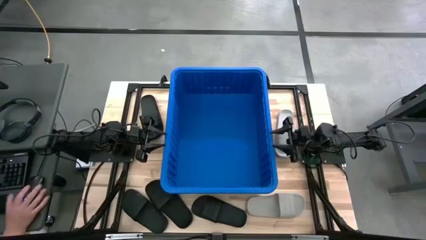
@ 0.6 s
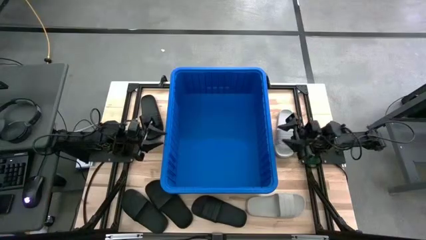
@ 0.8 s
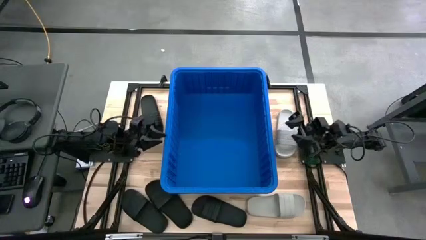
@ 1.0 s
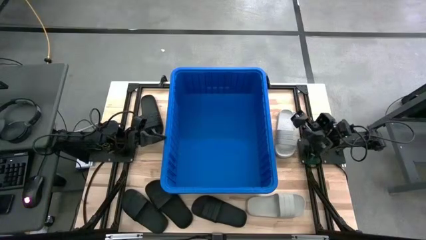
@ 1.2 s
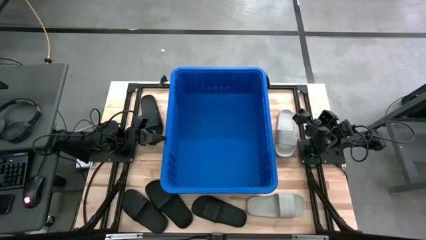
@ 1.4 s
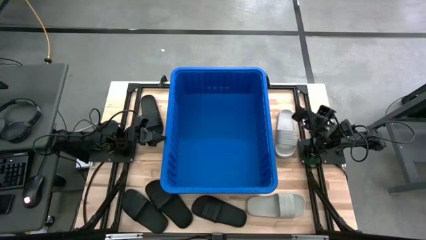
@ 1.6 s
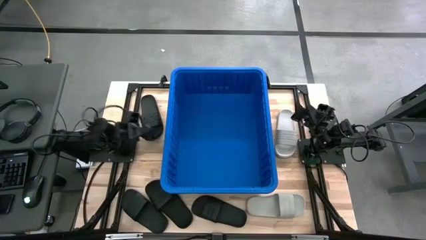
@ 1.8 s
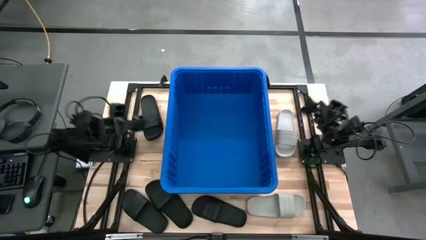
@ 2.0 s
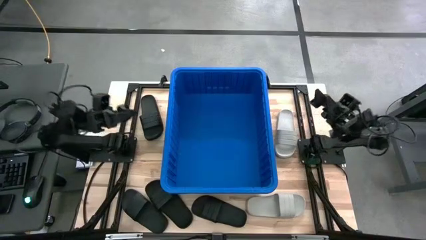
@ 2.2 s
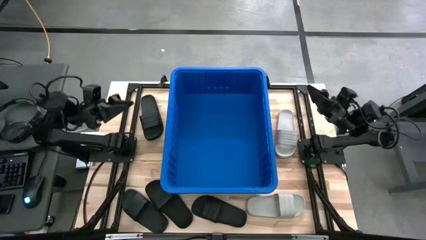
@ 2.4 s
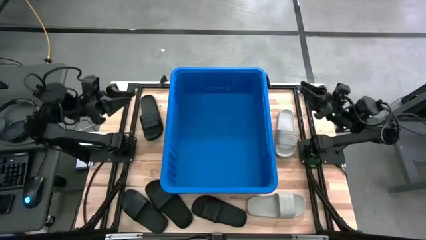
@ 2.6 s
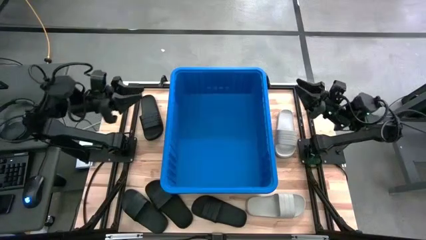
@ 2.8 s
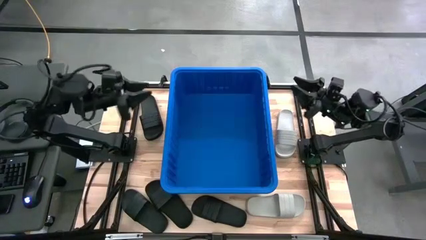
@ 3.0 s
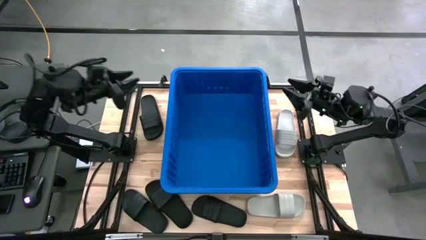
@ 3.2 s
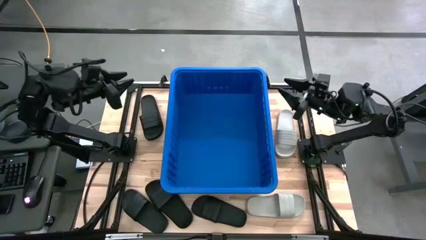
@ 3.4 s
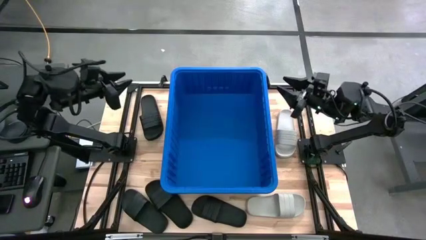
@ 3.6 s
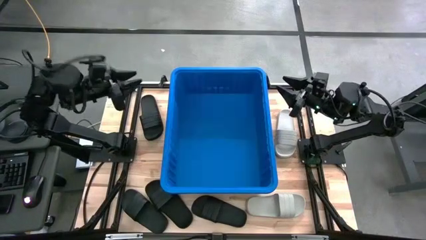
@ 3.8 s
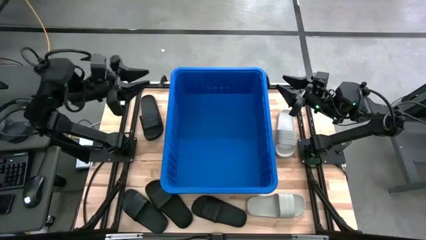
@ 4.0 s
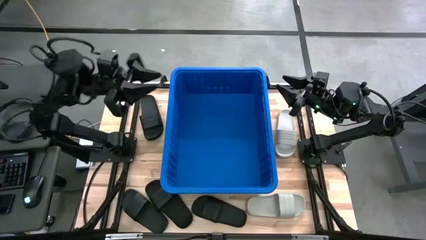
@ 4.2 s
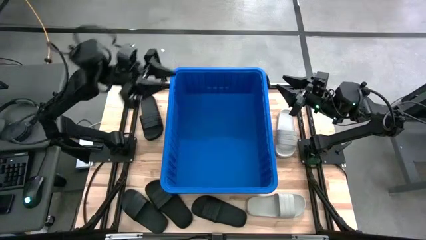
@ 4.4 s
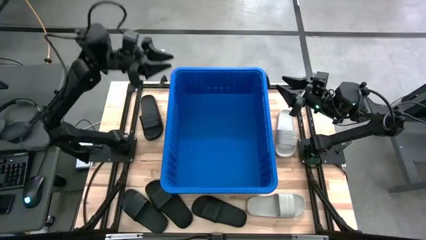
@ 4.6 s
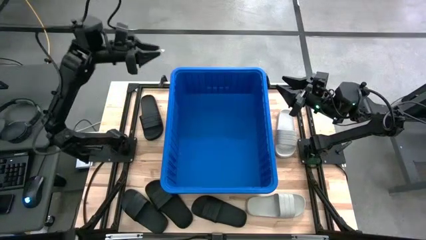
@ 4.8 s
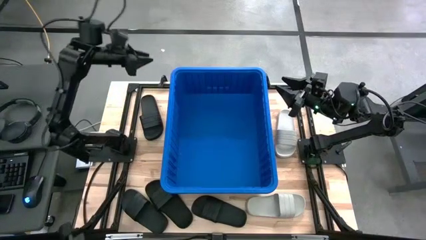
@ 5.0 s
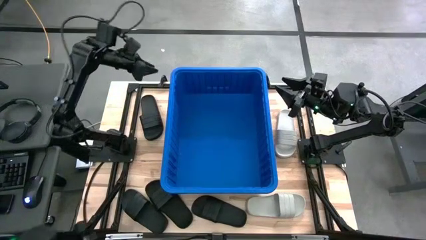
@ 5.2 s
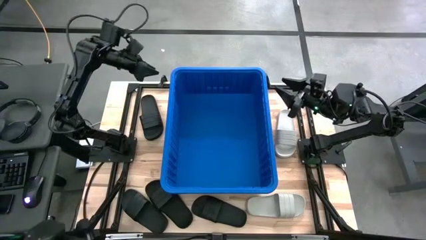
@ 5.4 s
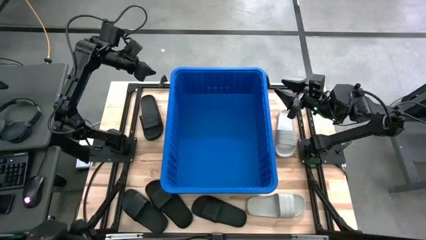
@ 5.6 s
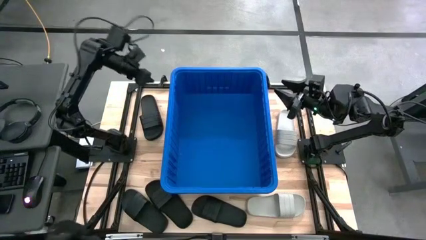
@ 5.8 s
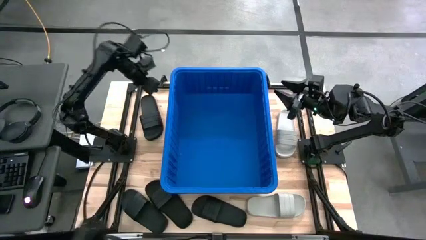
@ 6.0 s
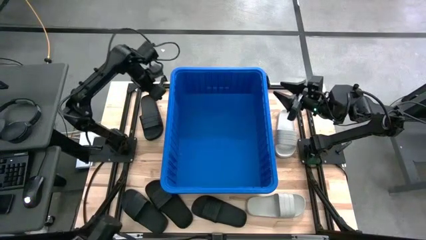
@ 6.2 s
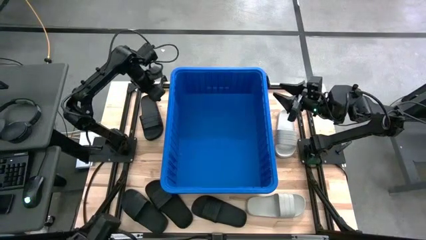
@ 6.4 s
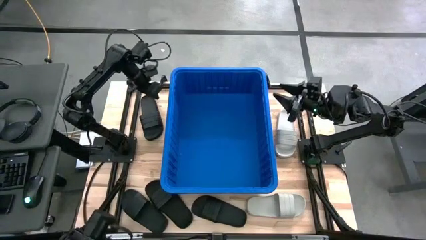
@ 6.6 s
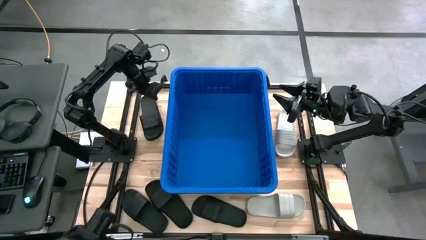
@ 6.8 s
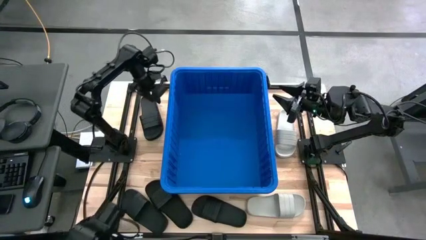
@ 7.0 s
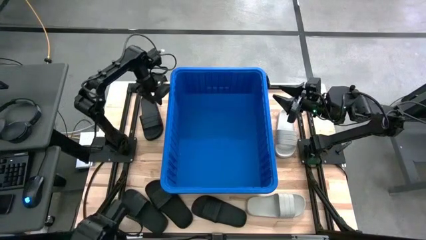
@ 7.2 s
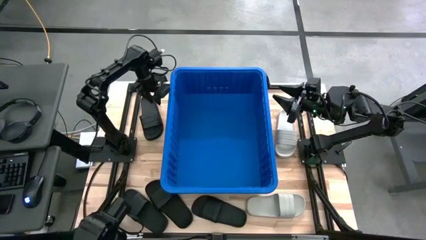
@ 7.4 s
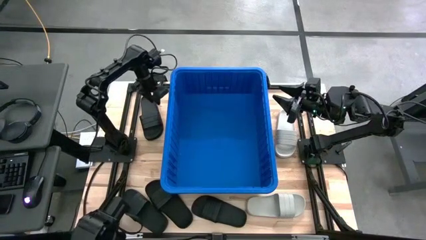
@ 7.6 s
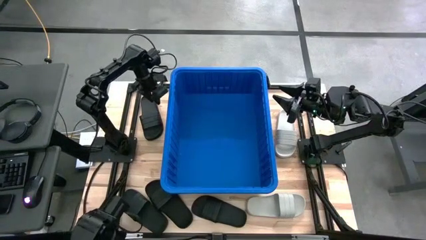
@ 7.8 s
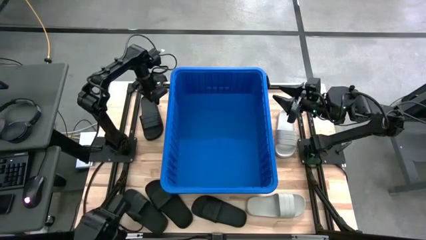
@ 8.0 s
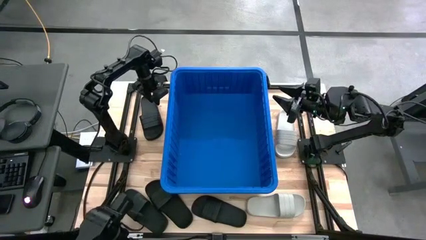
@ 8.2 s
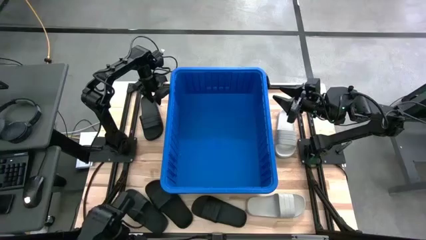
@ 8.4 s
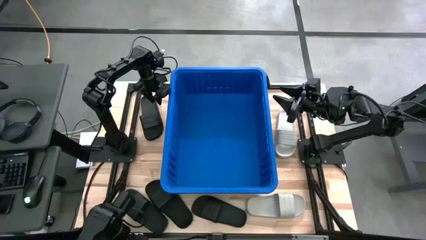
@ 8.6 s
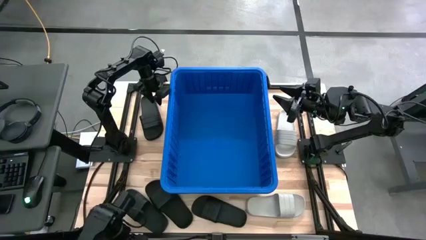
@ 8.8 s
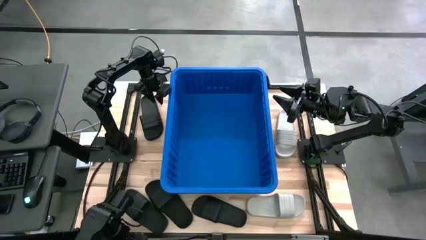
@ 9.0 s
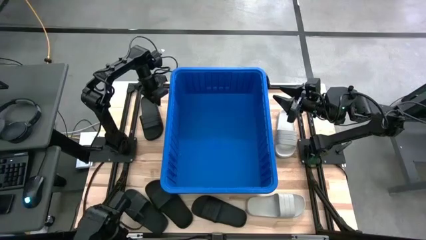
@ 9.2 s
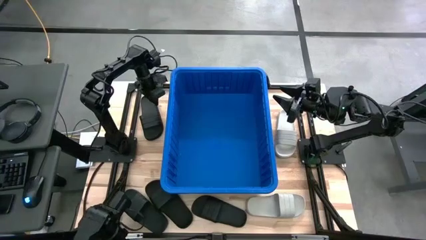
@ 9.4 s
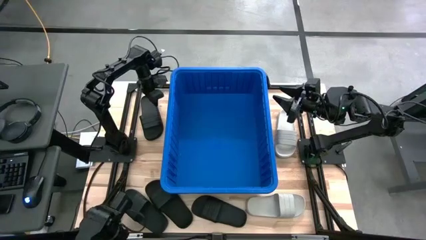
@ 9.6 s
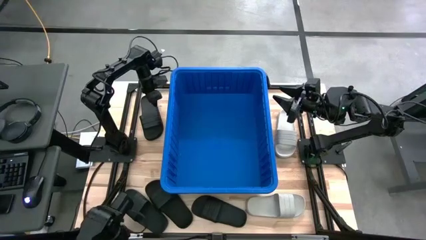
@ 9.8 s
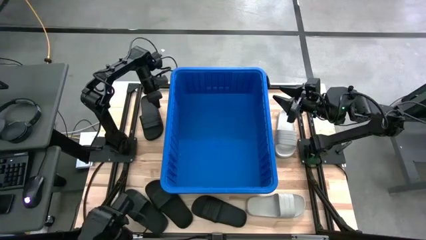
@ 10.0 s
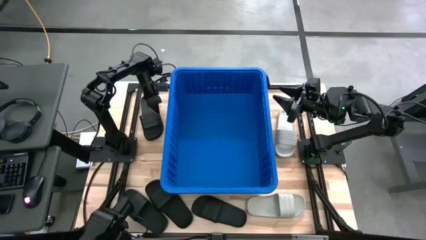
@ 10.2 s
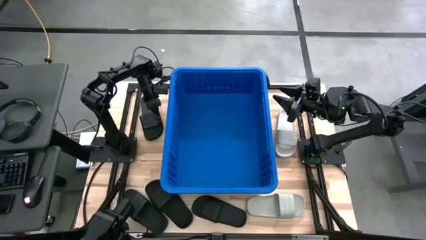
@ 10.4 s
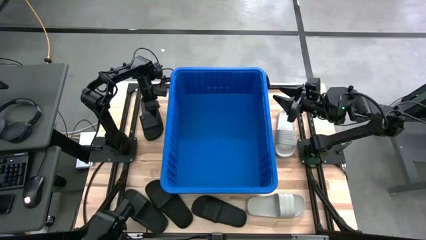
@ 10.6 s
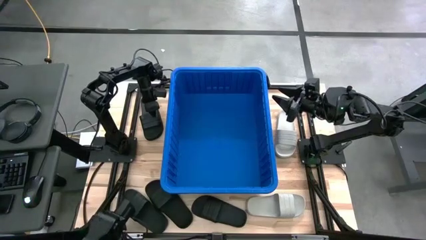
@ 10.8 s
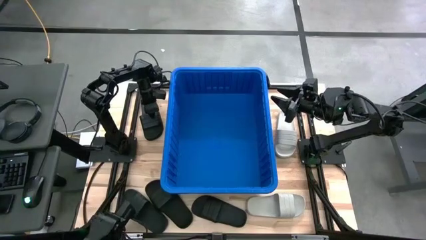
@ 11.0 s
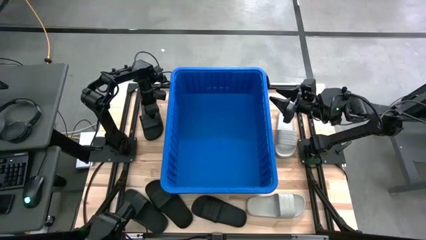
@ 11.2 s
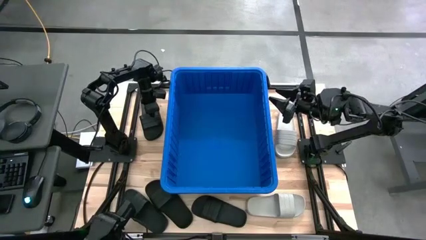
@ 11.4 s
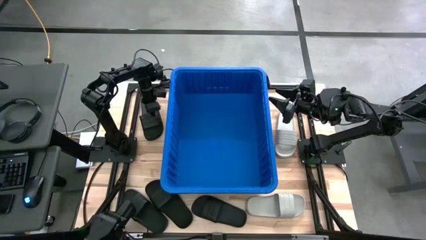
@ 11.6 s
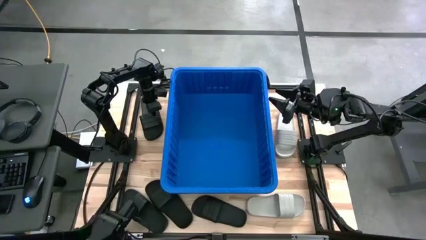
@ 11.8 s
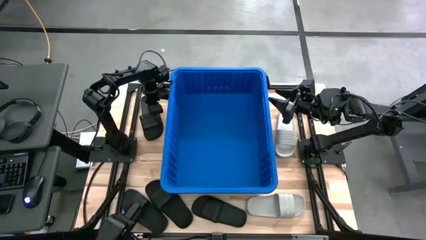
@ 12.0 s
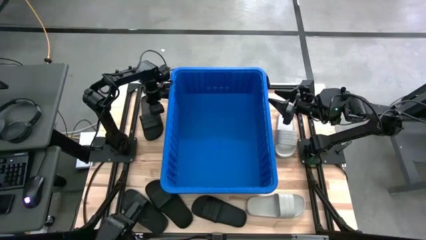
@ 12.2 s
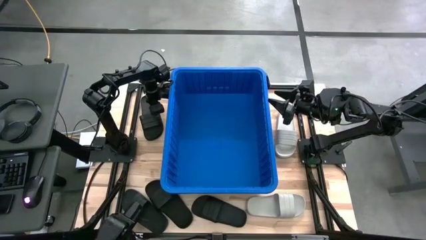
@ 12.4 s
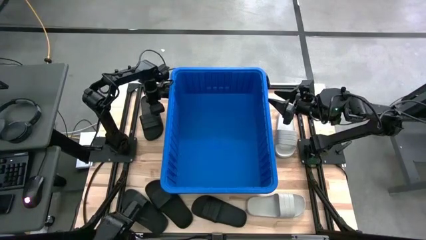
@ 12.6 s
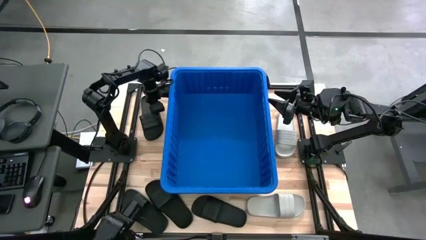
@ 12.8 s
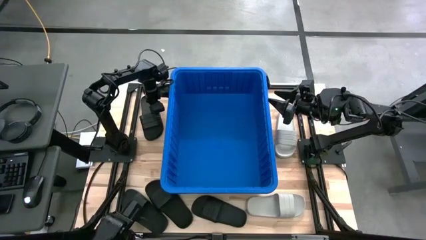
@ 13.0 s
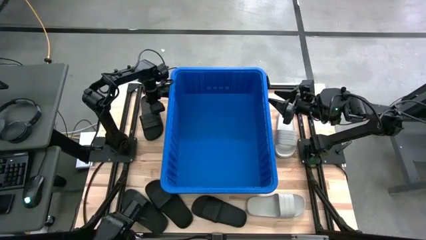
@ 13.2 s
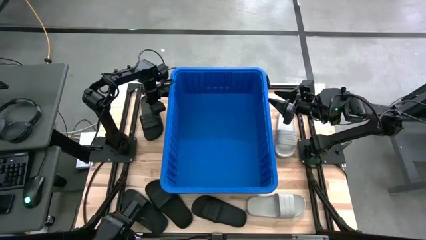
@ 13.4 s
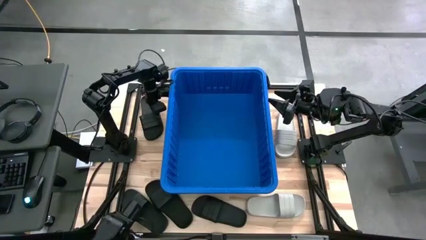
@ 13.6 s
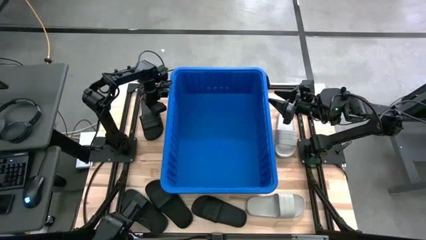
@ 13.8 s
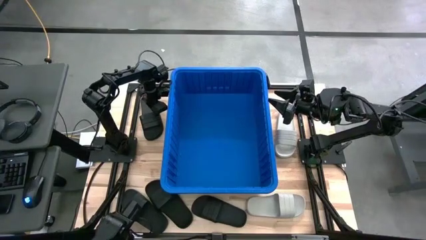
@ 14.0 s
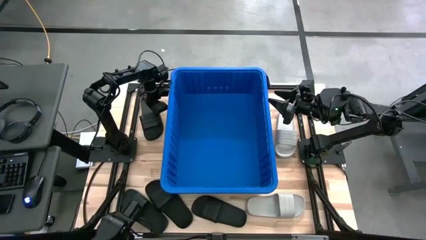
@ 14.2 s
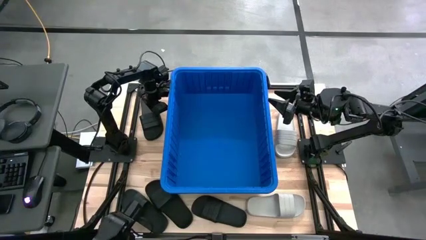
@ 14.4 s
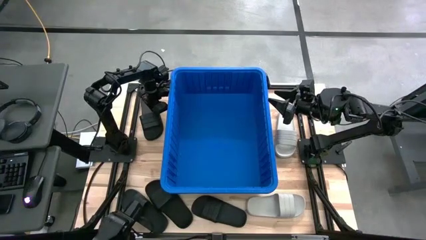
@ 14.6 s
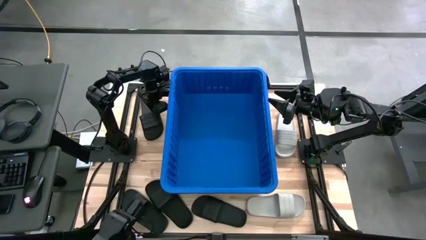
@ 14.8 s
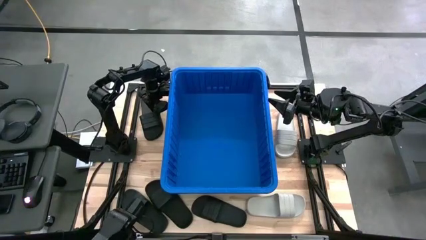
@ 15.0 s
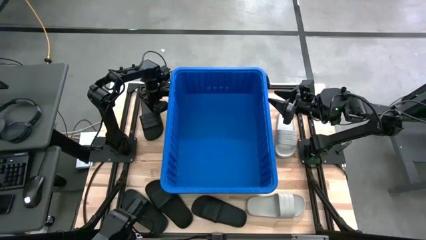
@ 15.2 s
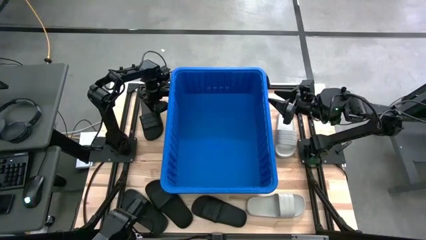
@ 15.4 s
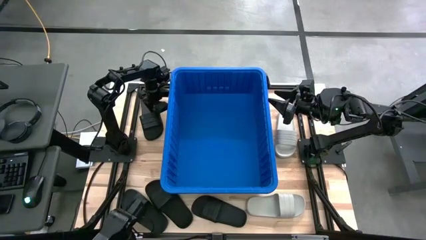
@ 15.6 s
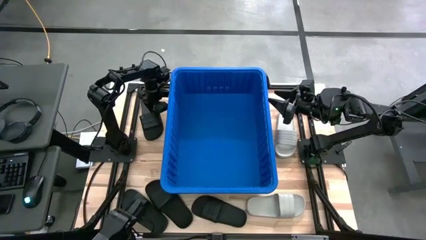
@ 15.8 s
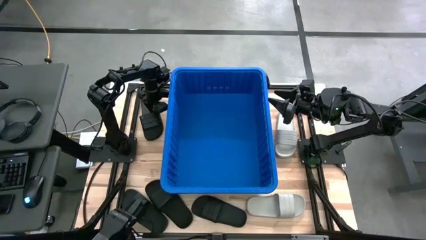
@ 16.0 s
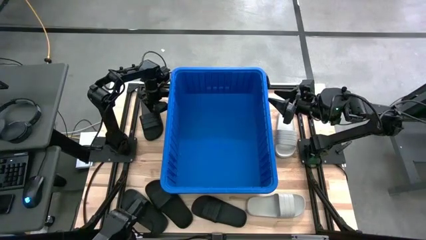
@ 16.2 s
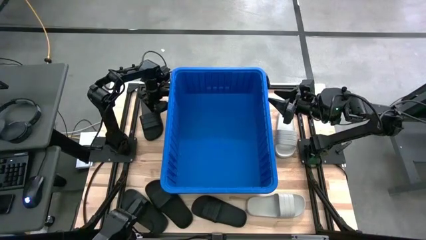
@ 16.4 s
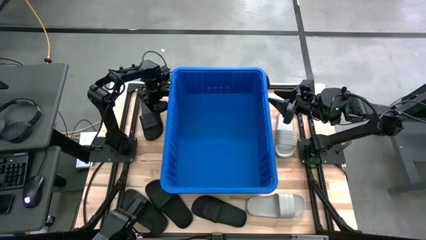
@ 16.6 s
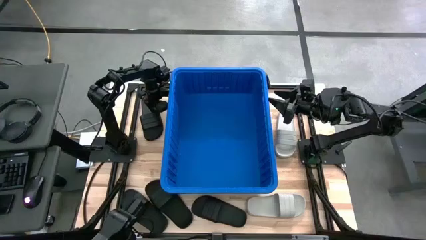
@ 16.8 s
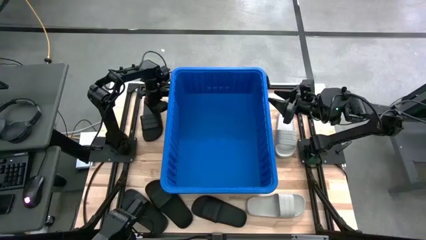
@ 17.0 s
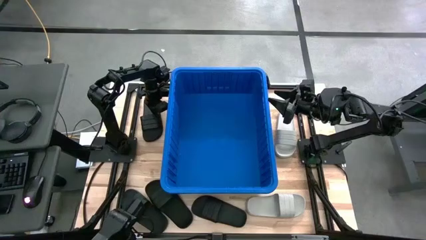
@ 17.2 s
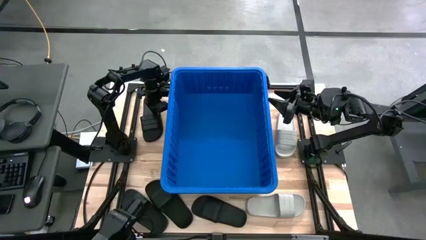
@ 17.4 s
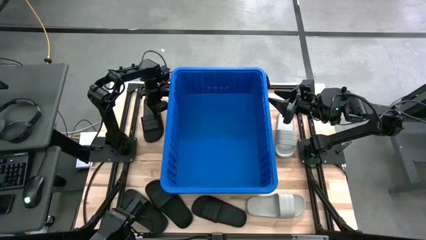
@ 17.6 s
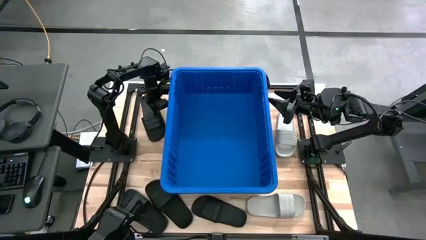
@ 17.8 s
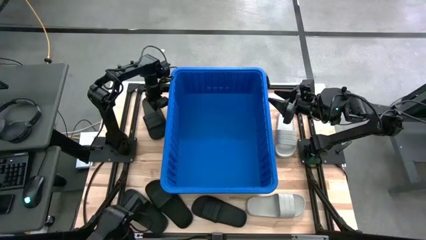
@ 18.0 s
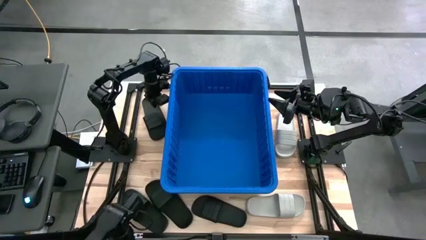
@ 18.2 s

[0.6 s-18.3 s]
Task: Pick and place slides into bin
Put the black slipper into the blue bin
